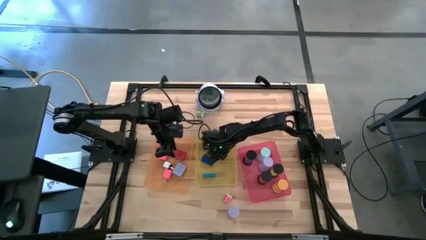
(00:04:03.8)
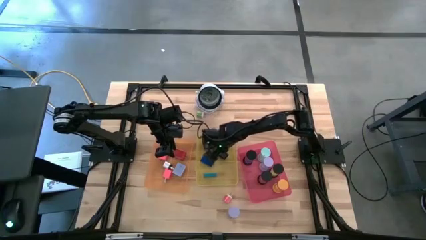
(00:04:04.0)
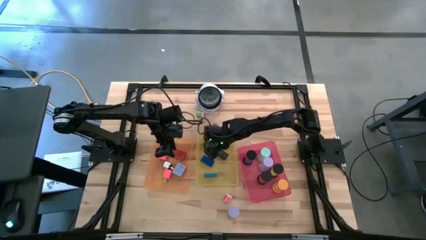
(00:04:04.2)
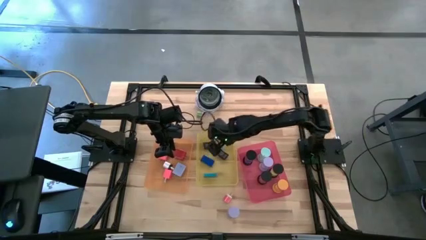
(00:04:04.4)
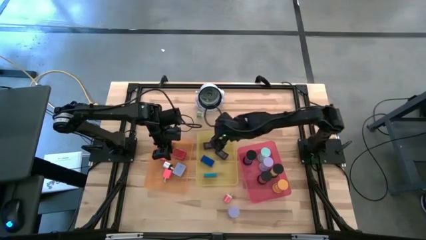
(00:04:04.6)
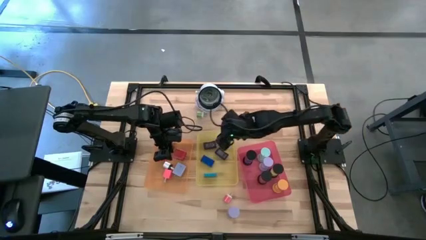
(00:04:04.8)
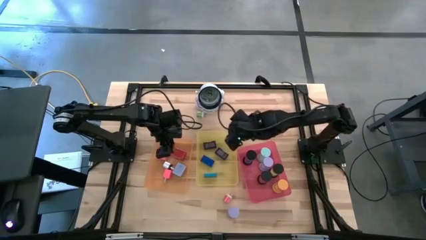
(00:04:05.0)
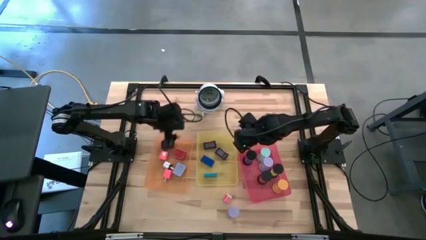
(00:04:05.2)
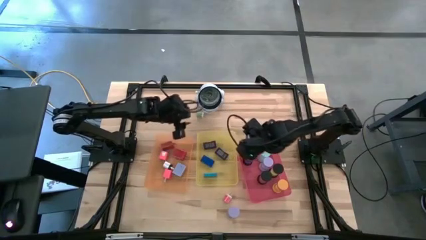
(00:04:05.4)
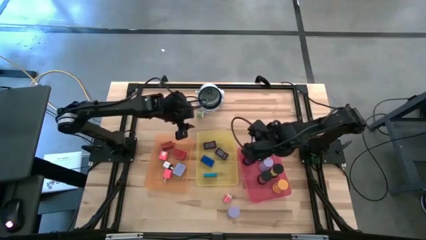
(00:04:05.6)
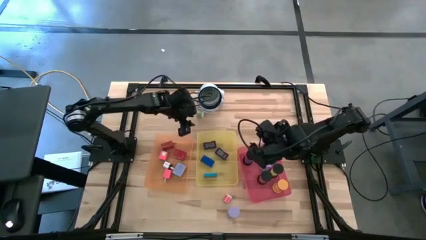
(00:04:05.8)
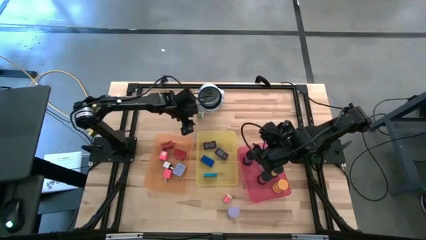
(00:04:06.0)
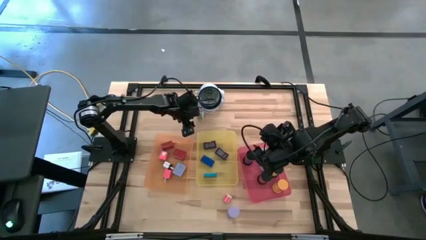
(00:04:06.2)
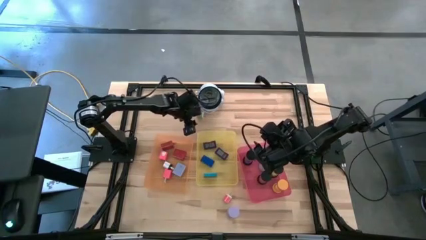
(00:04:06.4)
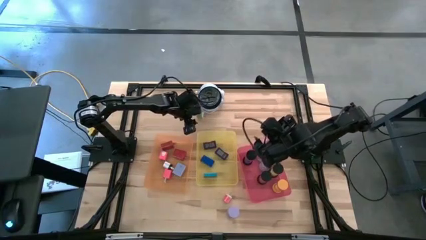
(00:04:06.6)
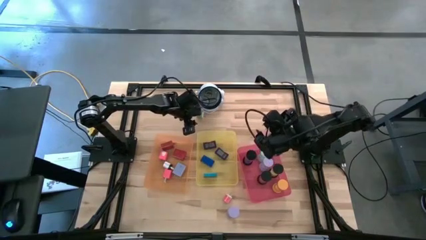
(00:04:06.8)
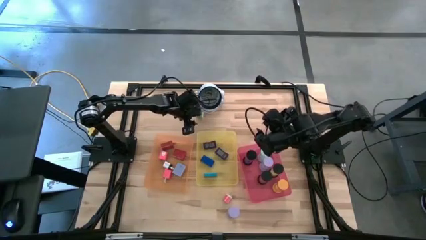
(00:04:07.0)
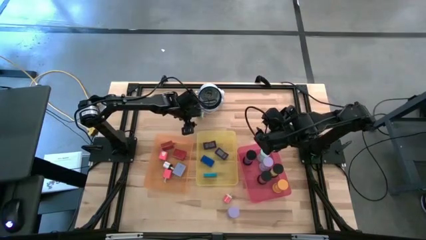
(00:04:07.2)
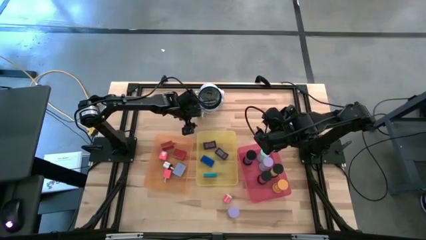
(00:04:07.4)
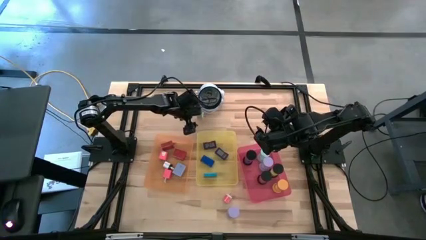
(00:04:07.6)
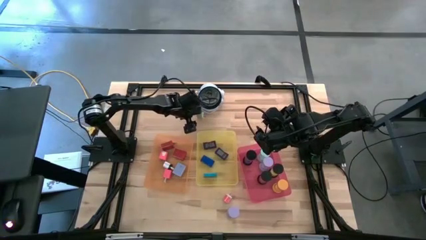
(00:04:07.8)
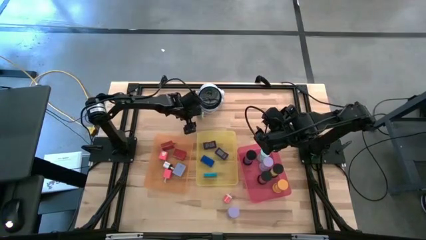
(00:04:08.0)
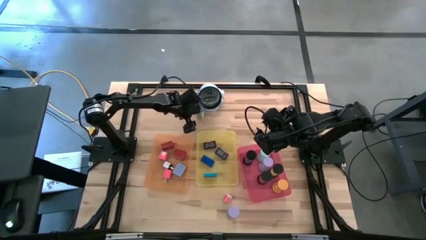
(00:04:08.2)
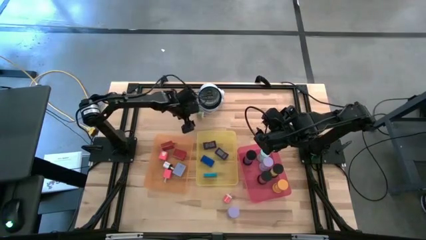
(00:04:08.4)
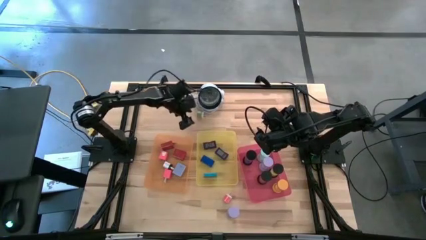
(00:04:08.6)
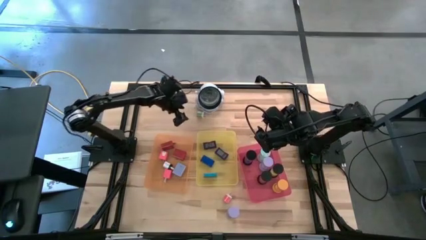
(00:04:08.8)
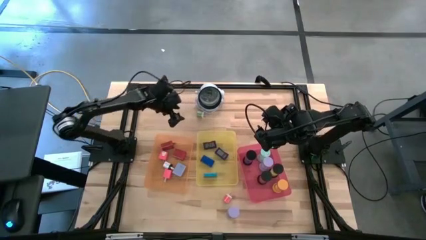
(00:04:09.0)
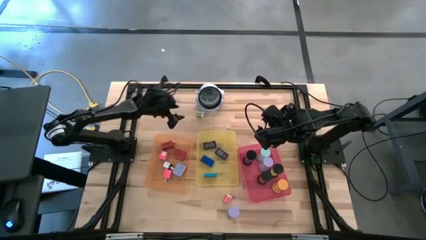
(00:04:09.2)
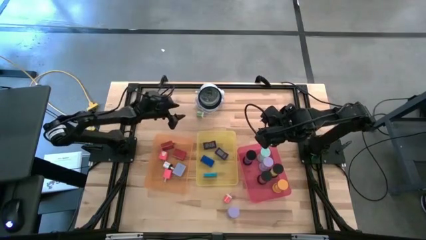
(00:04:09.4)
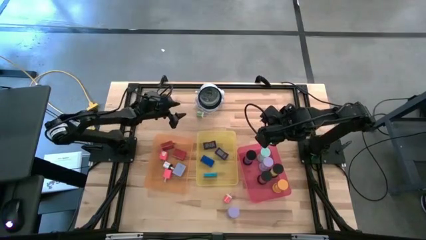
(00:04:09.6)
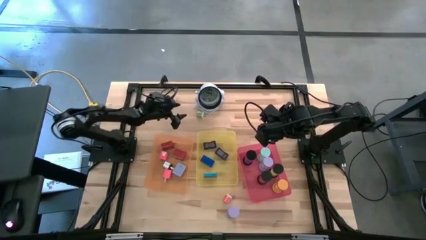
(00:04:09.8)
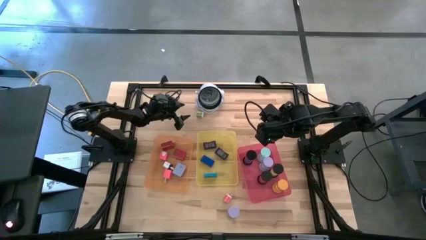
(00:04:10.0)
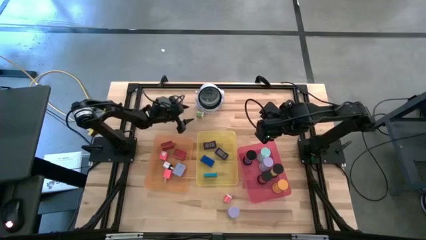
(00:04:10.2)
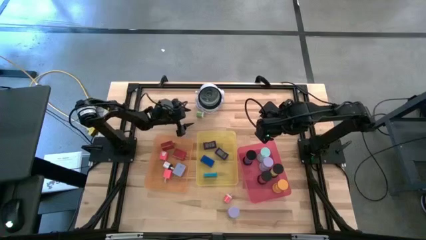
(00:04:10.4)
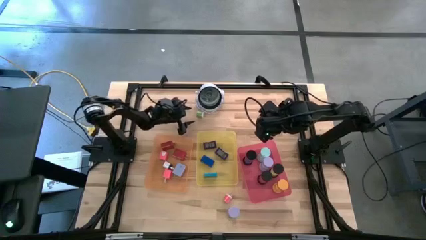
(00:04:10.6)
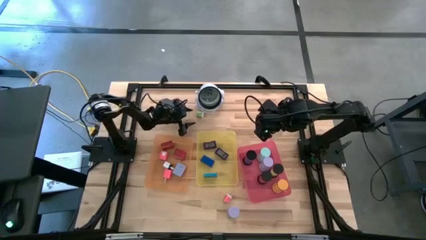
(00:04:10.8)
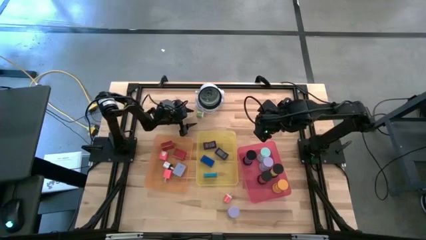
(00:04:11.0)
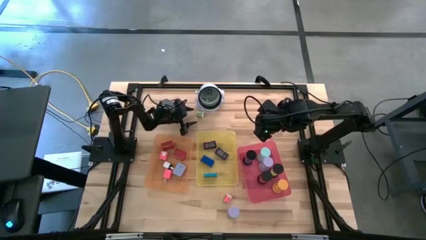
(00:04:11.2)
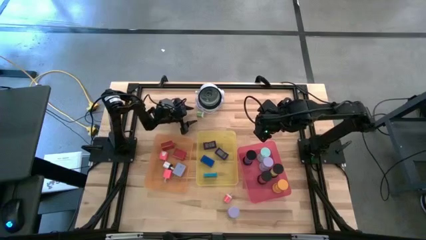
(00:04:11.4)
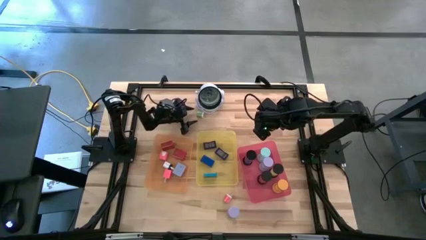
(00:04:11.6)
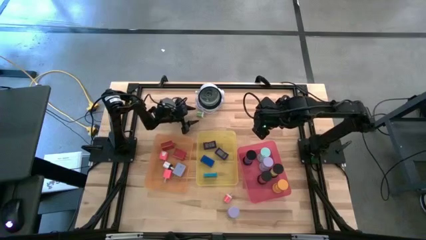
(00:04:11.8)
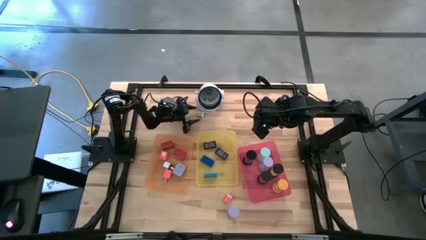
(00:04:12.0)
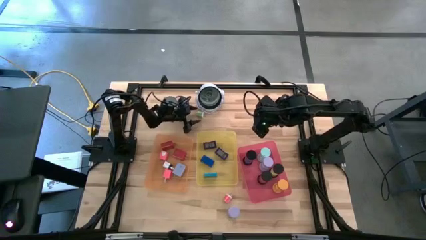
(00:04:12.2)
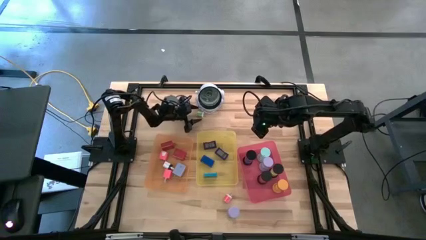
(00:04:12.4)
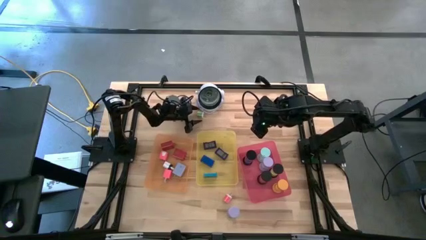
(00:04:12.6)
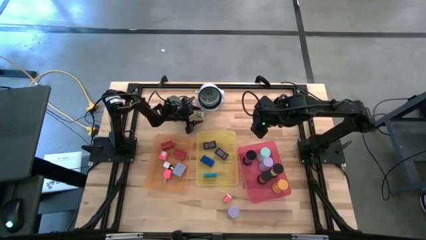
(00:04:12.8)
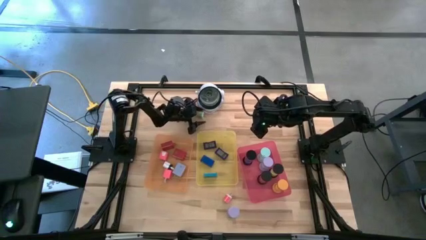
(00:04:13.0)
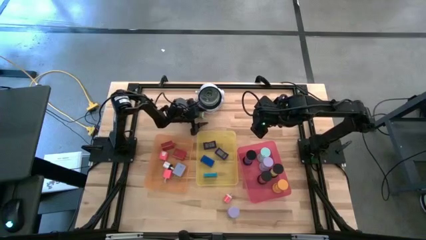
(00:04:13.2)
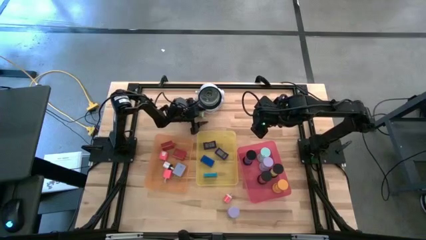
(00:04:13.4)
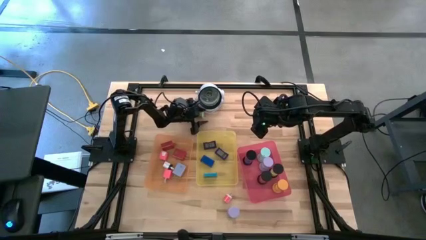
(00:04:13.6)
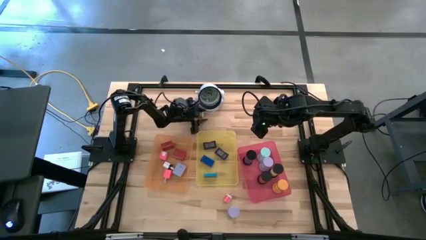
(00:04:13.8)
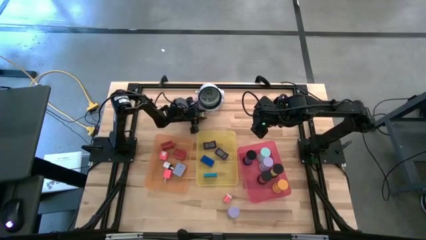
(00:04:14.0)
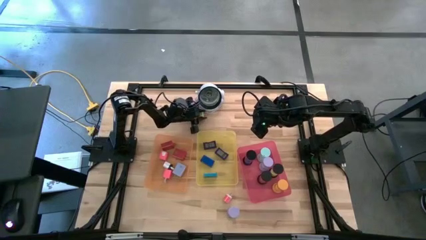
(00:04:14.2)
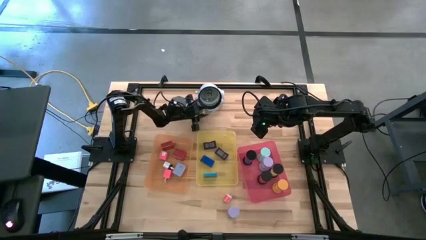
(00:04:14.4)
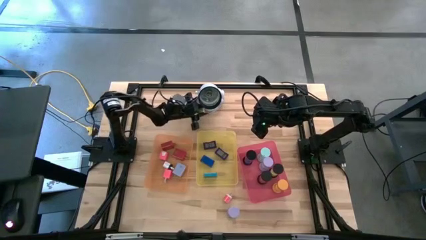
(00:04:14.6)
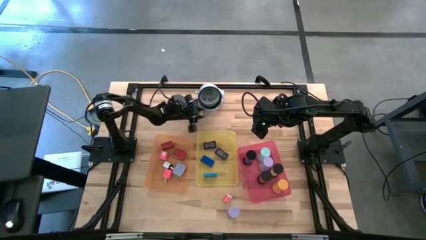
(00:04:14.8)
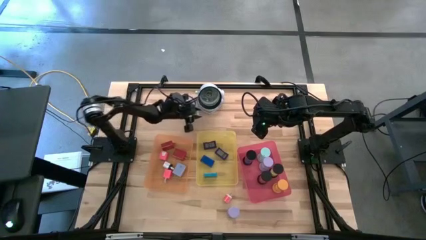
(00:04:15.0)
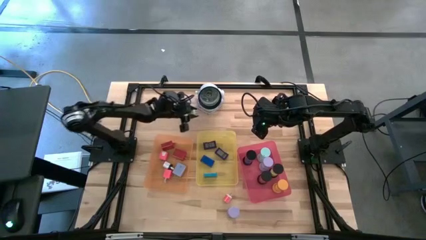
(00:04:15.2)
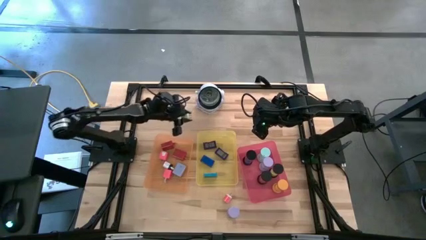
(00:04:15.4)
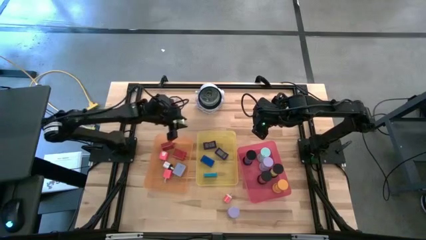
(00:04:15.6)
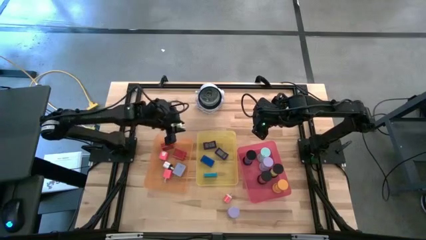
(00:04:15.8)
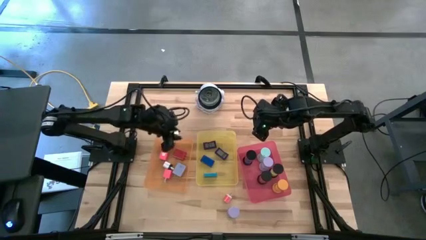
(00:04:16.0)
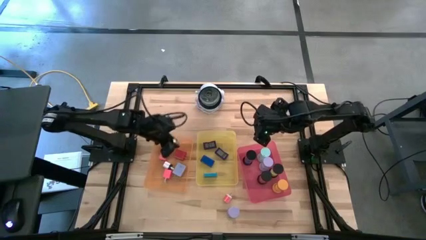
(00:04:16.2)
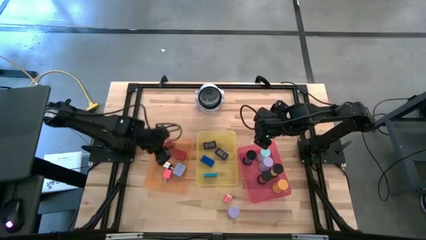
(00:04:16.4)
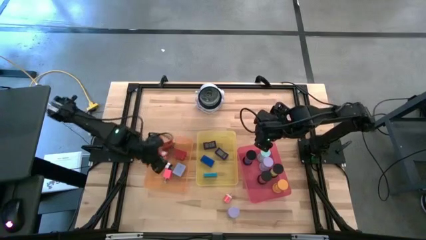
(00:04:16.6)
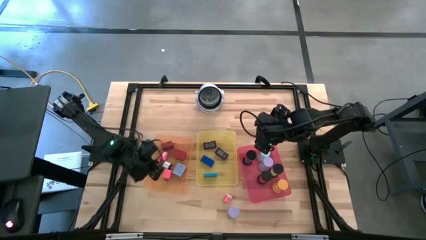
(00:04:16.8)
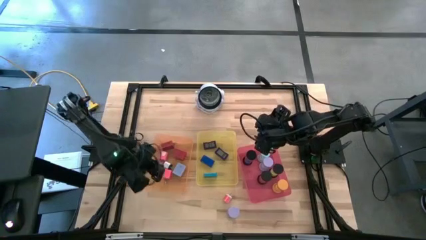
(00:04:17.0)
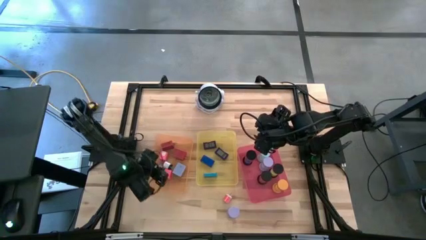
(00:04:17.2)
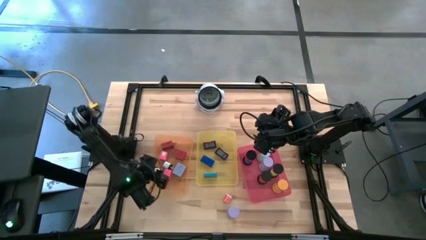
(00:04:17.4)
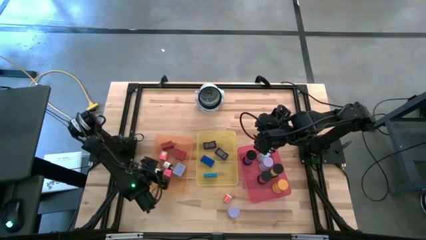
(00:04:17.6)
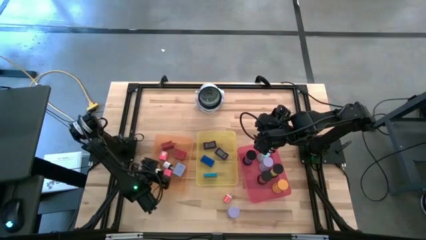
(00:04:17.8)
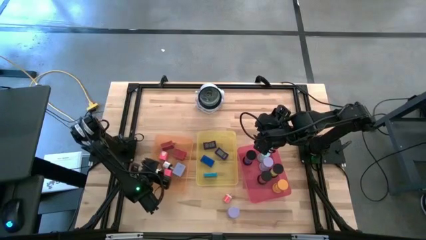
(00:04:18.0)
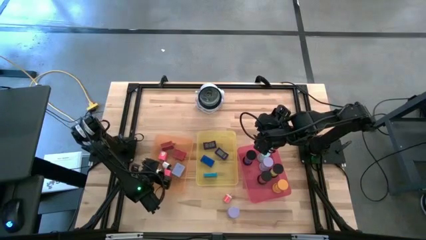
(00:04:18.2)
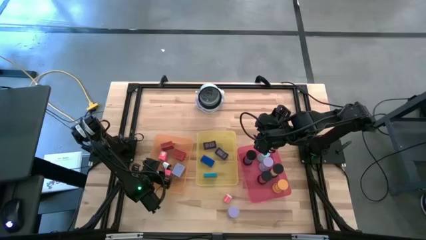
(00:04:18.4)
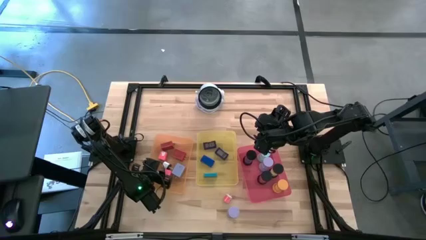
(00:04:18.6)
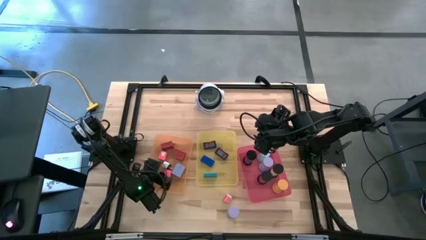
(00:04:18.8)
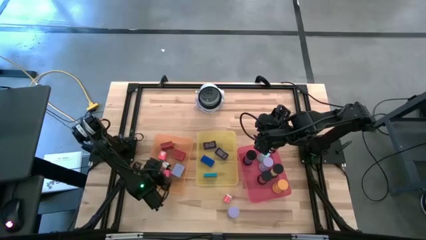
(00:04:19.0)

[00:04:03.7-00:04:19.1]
Task: Pick & Place Office items
Put the green charger adaptor into the orange bin
